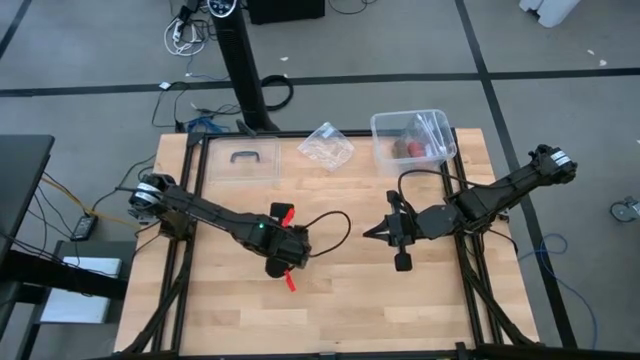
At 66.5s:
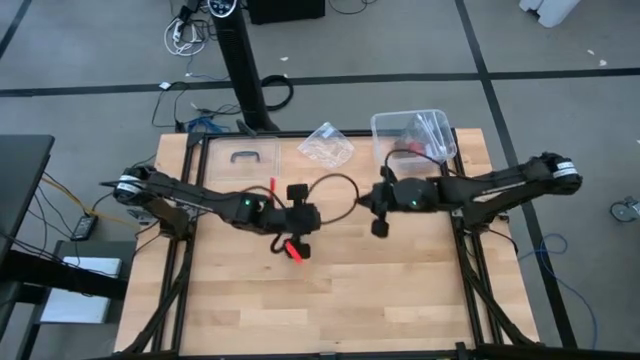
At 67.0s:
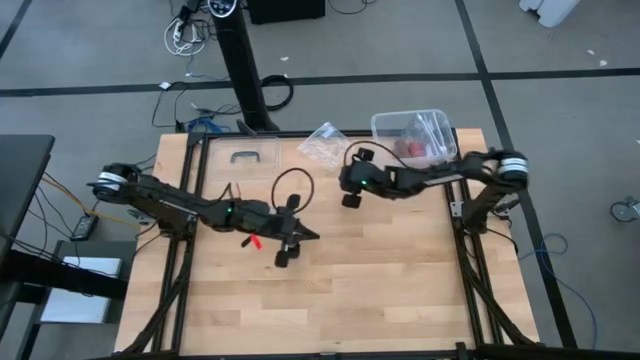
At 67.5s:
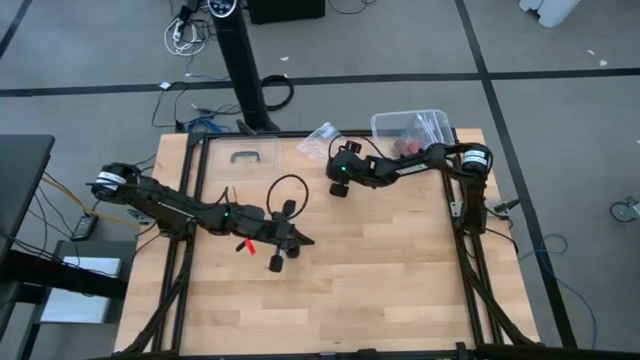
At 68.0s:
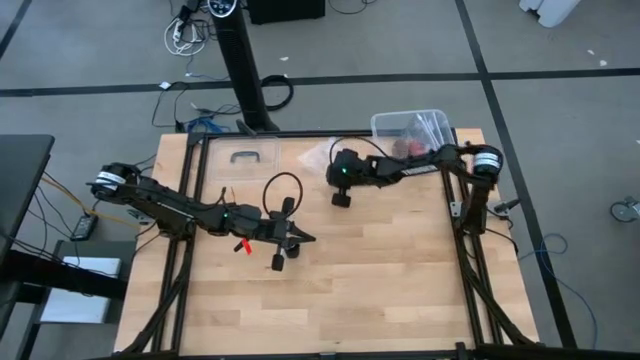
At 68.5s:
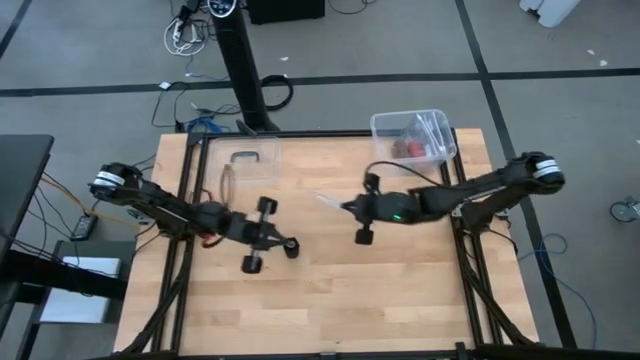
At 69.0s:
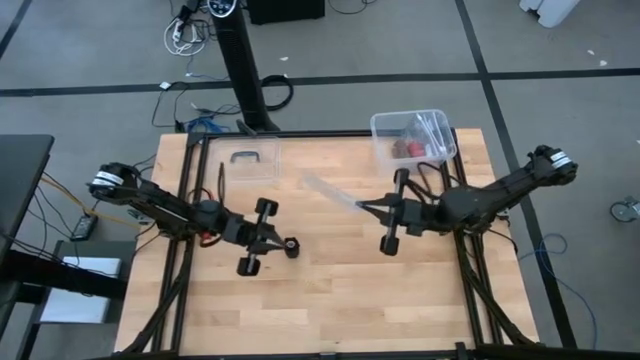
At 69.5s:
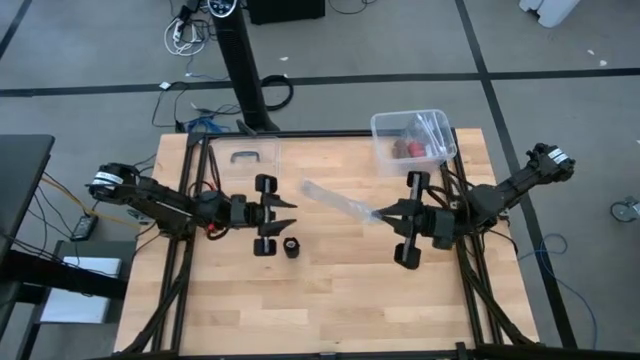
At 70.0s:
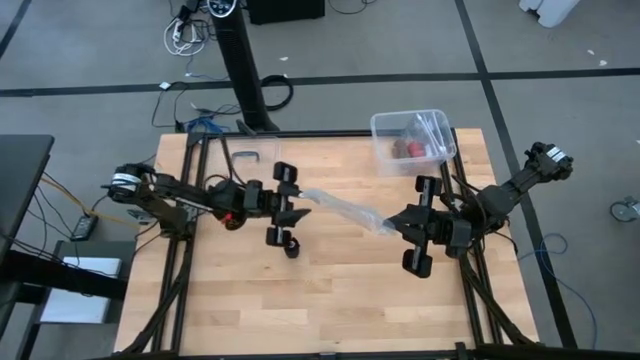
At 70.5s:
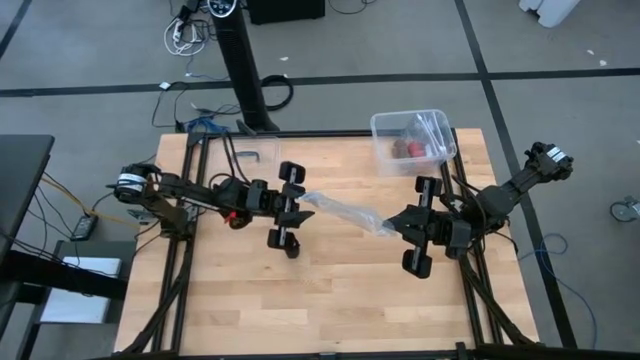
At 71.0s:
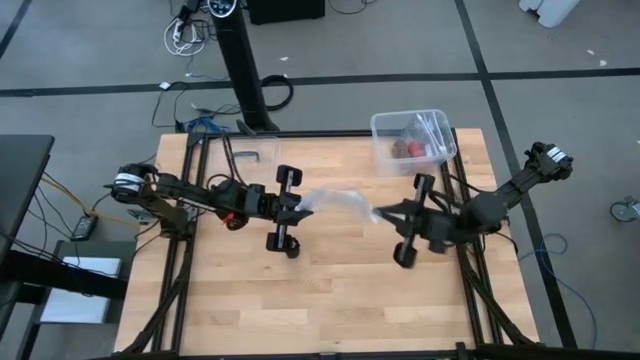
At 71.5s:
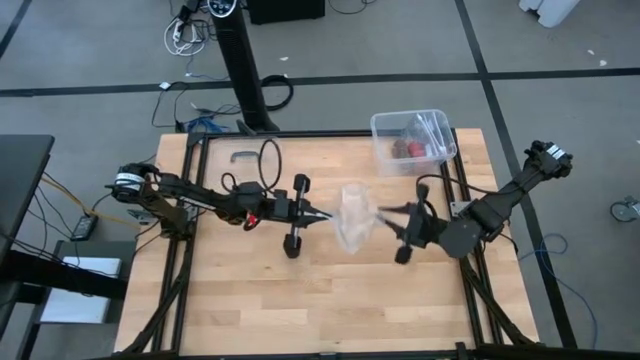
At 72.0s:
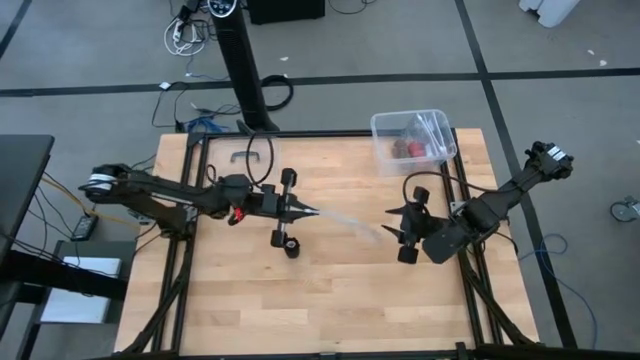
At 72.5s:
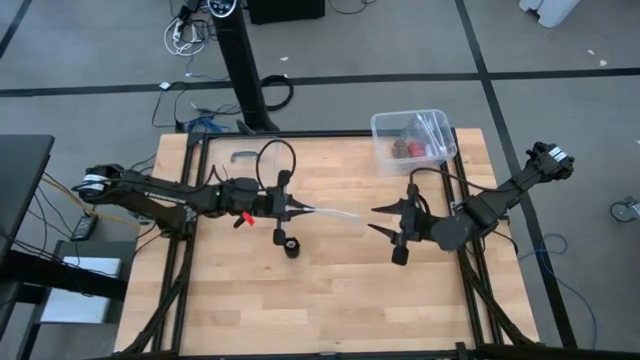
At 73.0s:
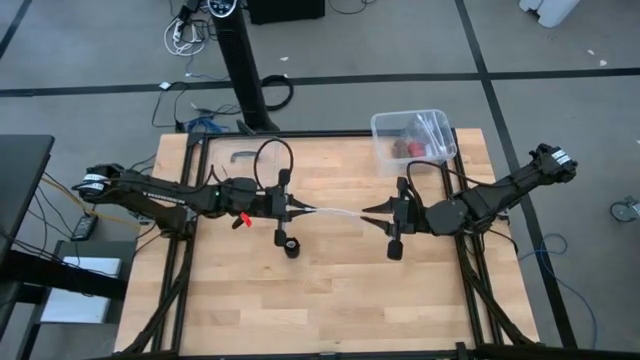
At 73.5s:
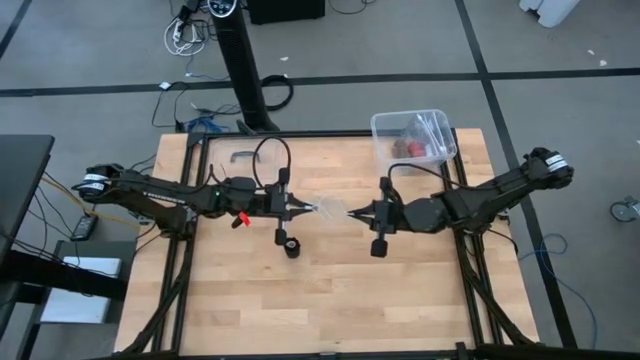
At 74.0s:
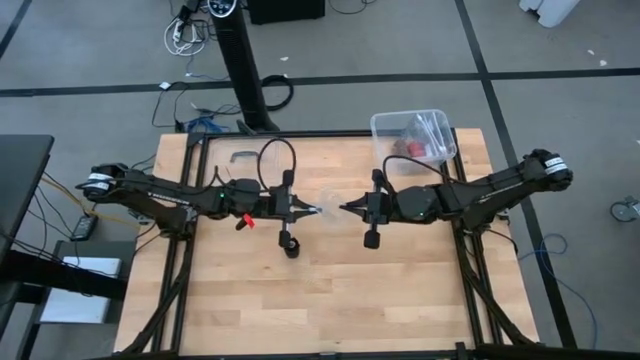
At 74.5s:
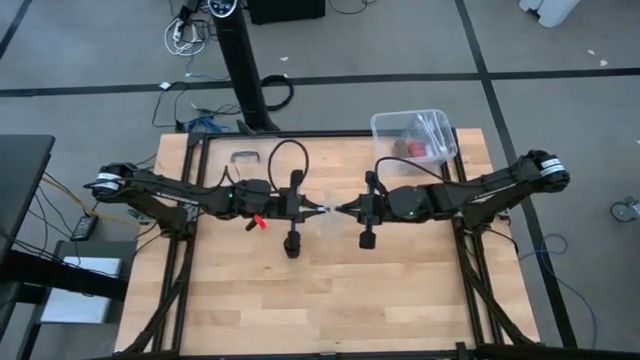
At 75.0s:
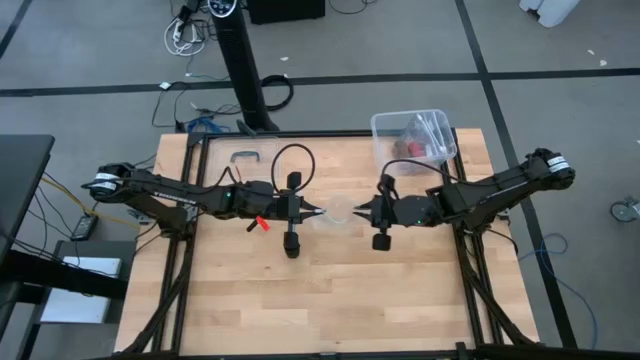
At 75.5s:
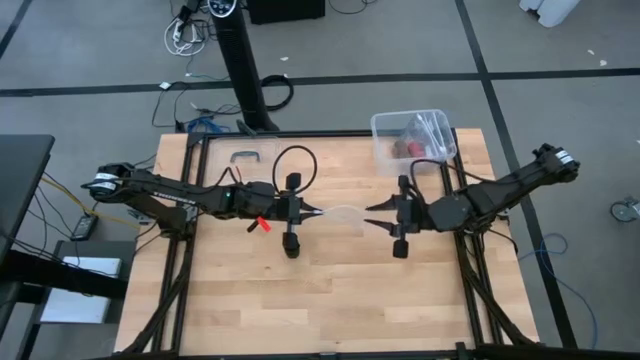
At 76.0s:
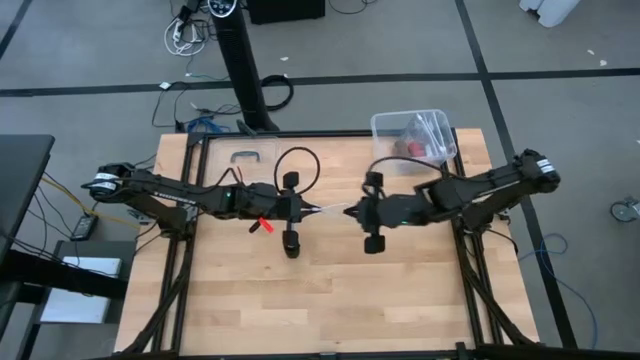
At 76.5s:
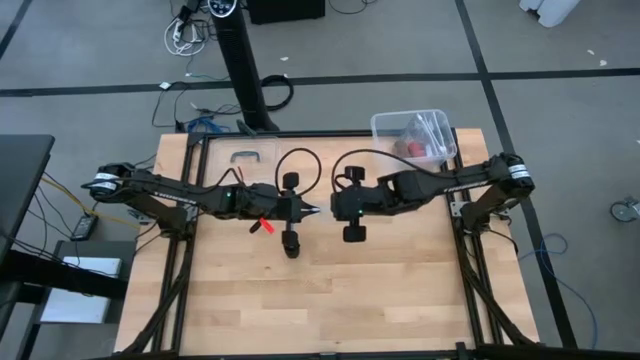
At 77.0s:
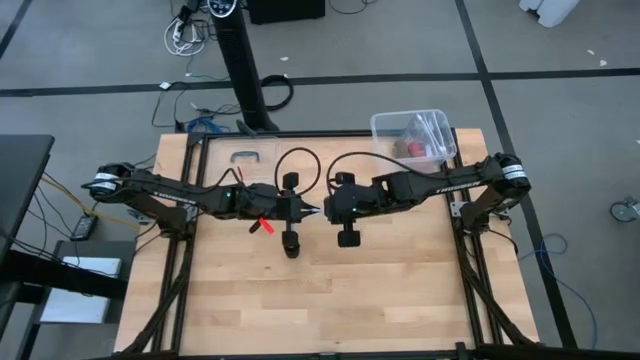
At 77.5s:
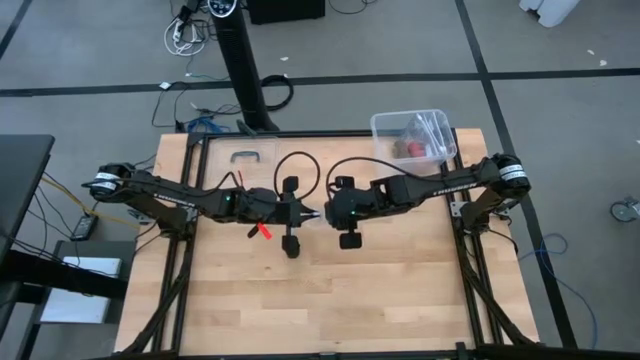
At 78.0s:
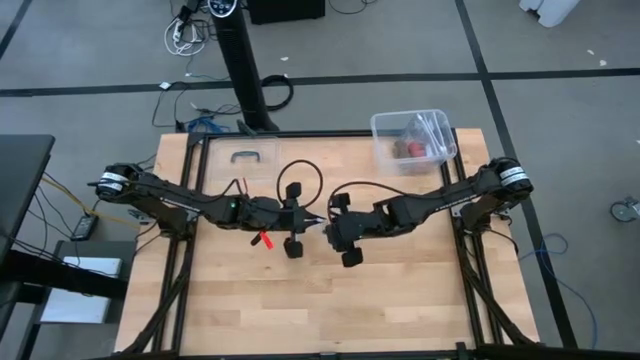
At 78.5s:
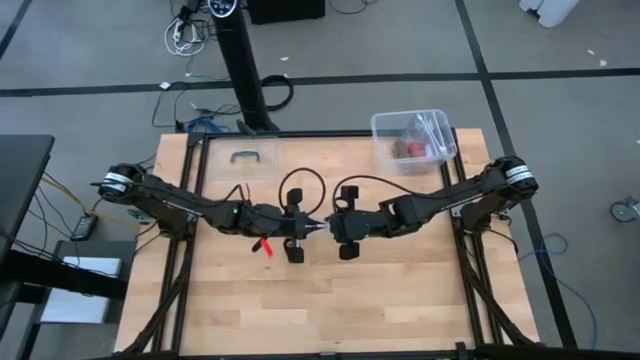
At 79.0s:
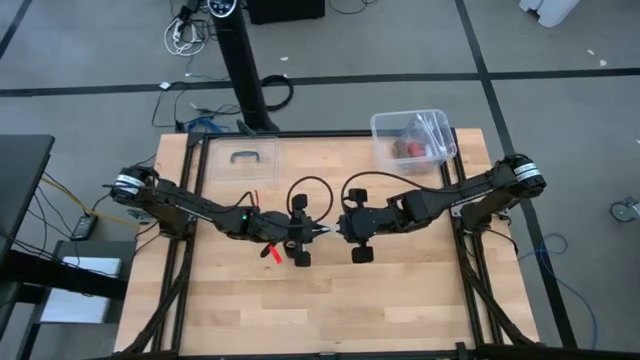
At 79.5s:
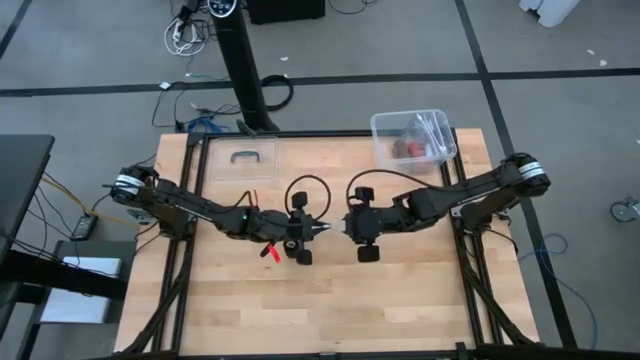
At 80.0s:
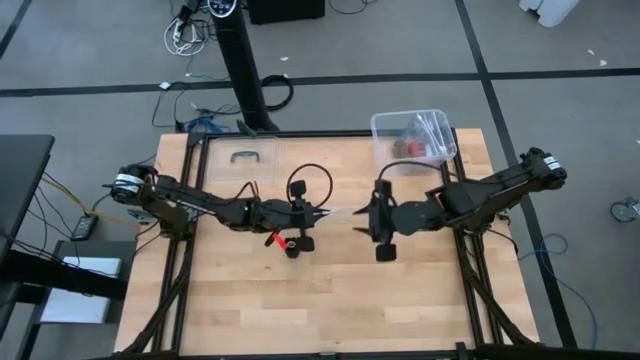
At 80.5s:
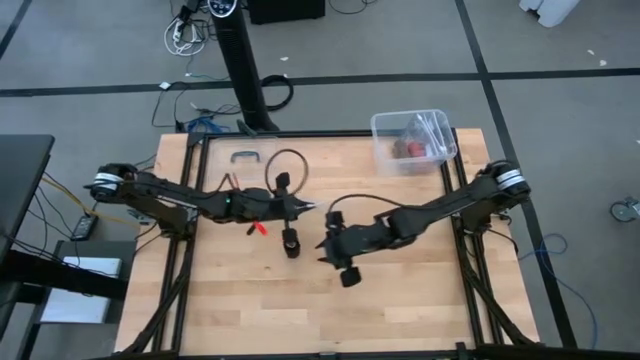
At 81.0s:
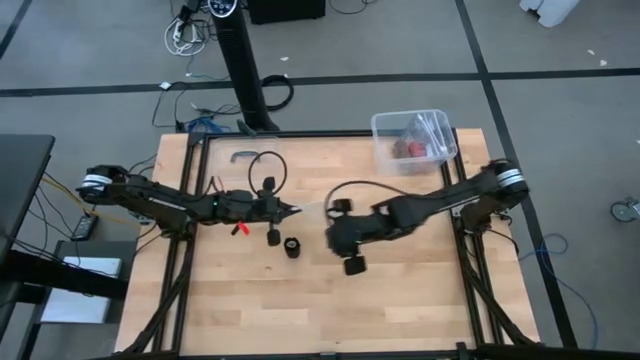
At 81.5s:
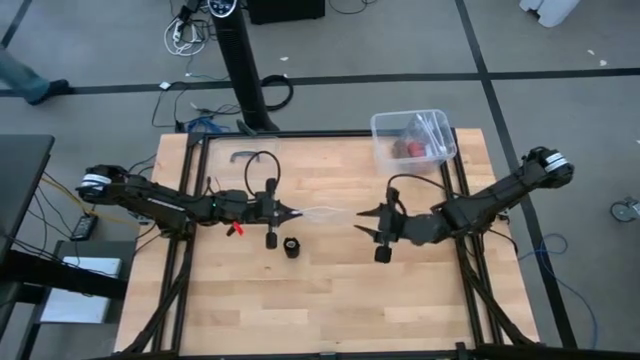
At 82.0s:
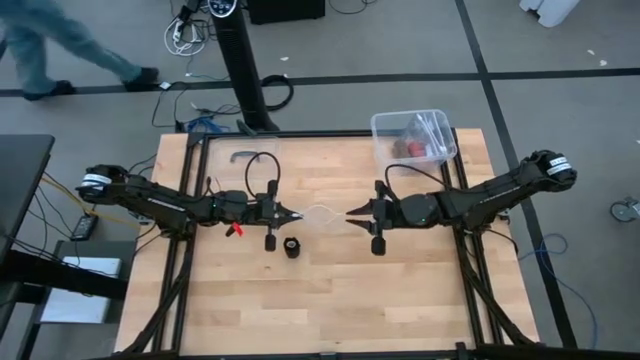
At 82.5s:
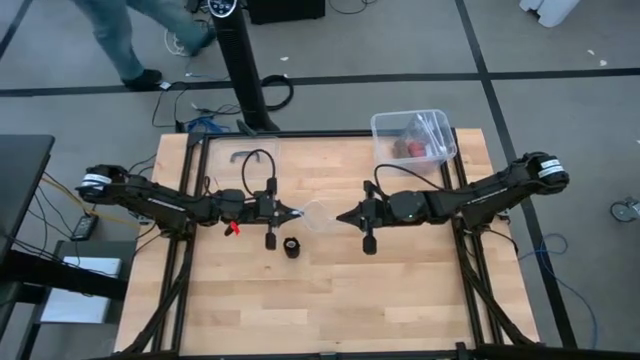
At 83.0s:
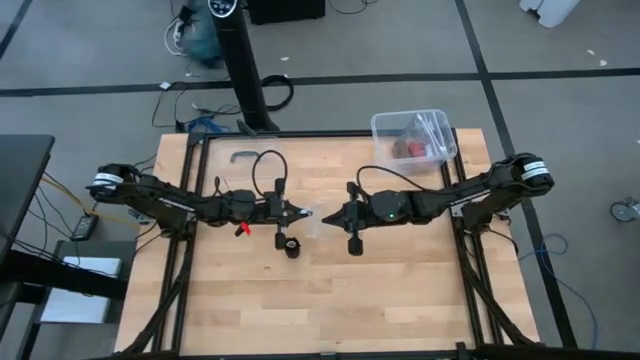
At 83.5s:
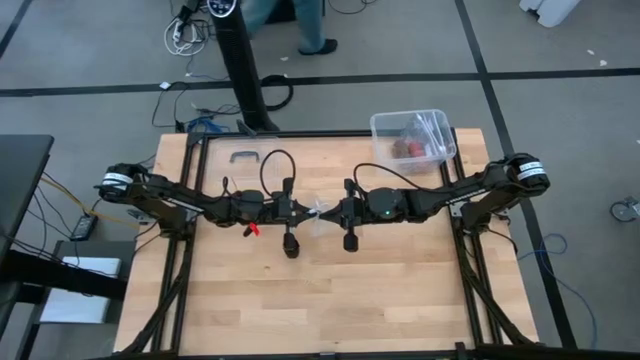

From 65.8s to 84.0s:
Task: Roll bandage
Prepare the transparent zip bag

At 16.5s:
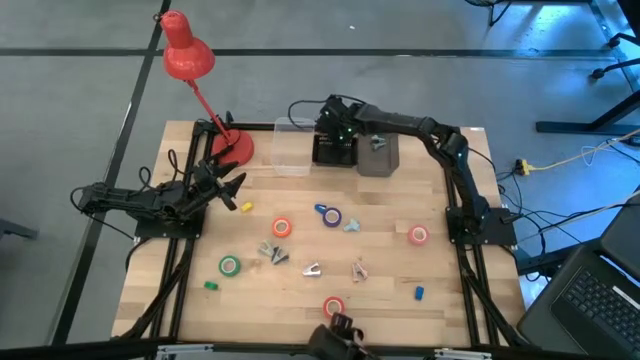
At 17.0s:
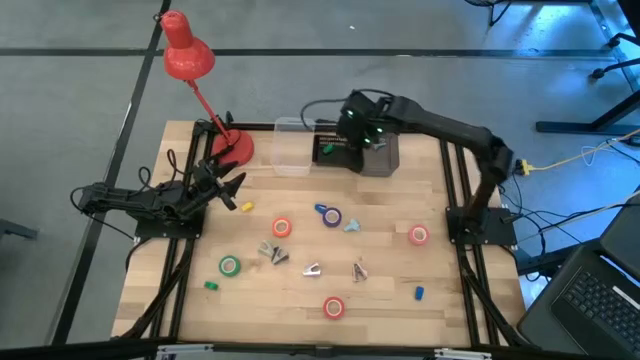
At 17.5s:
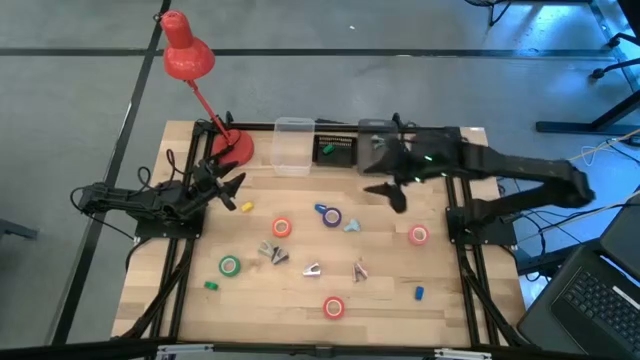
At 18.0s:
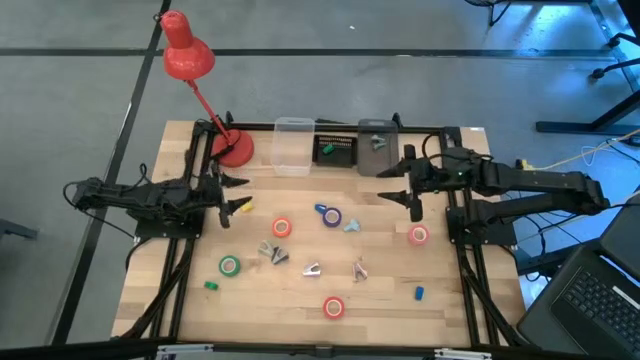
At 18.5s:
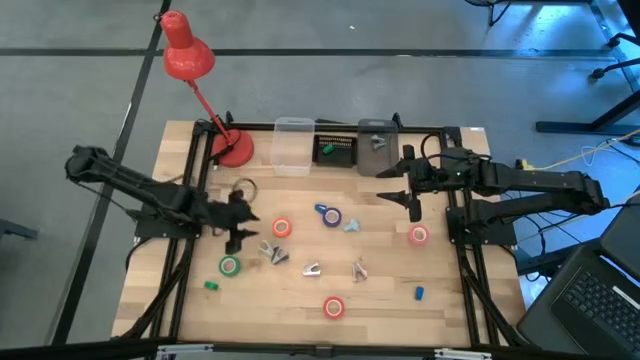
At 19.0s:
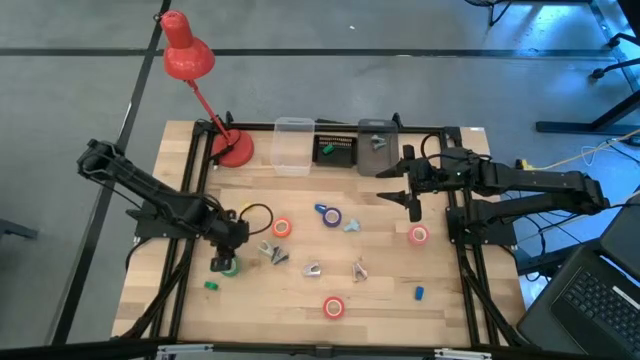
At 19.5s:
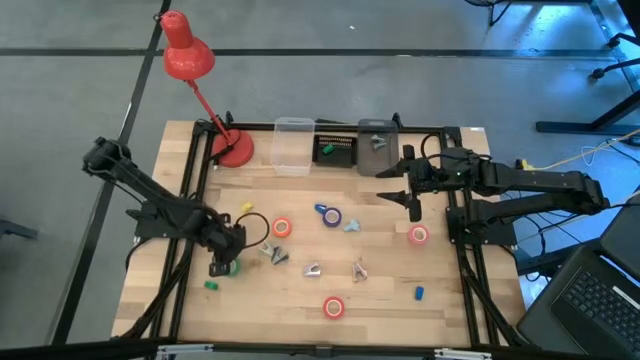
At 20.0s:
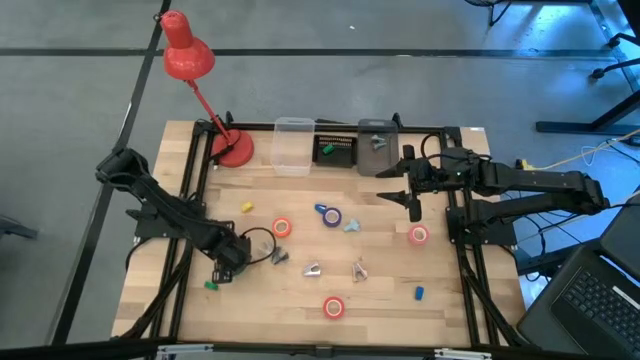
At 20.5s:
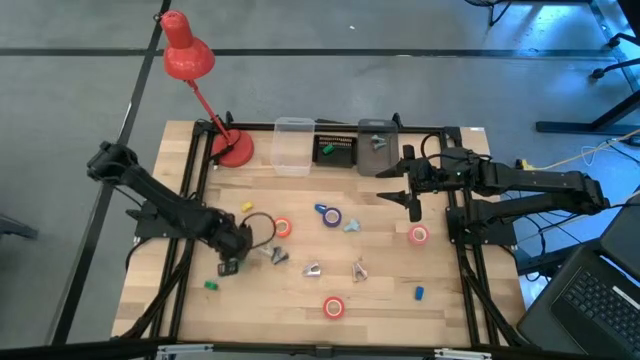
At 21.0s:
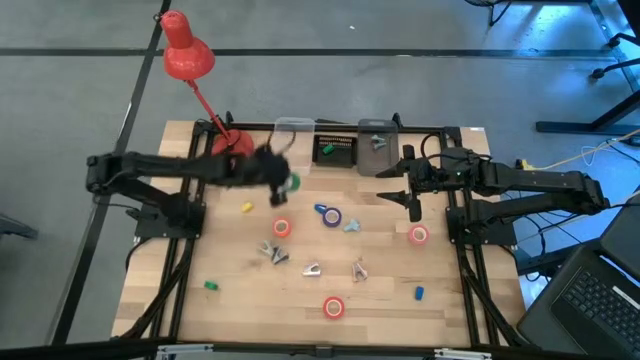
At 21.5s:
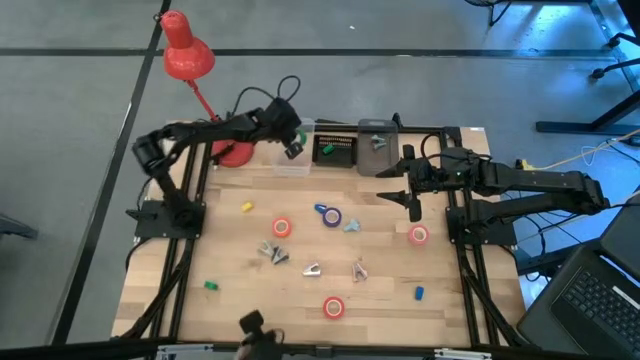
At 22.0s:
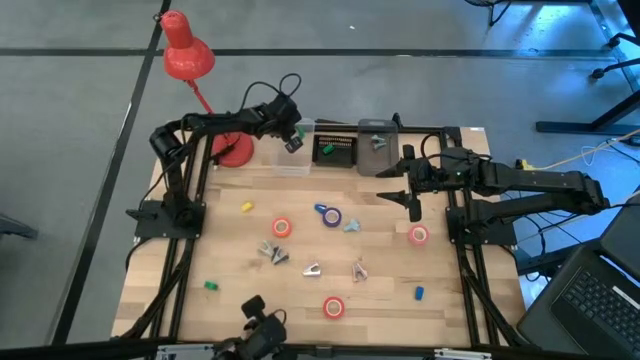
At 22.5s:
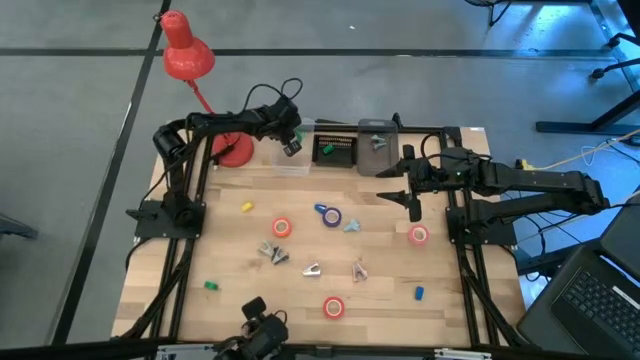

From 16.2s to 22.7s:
Task: Pick and place Stapler, Stapler remover, tape
Put the top green tape into the transparent bin
